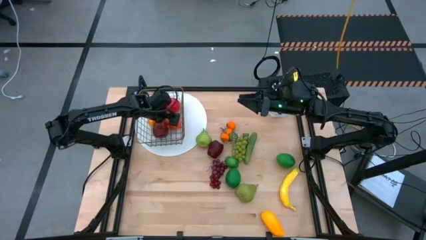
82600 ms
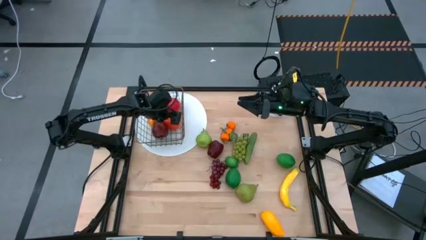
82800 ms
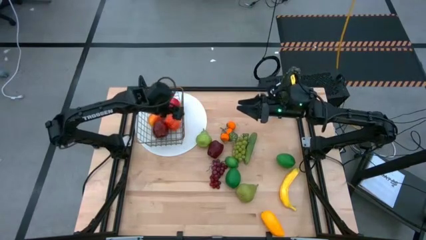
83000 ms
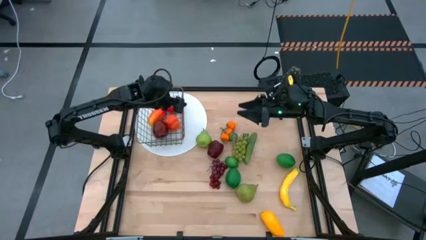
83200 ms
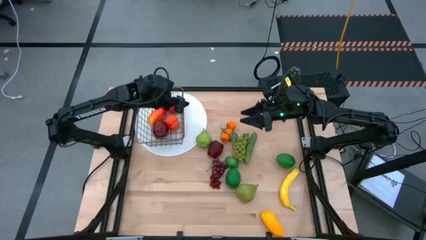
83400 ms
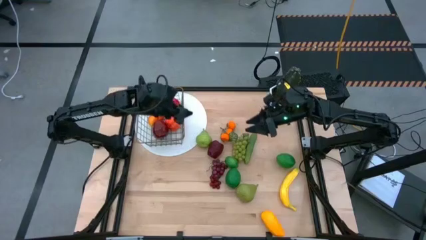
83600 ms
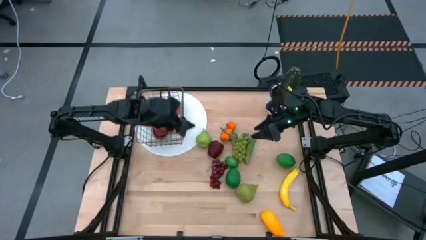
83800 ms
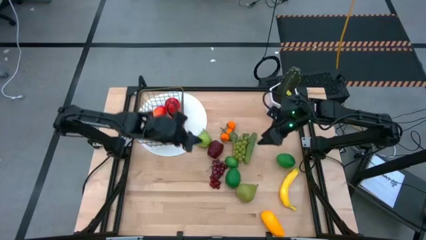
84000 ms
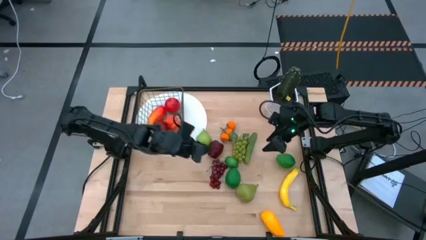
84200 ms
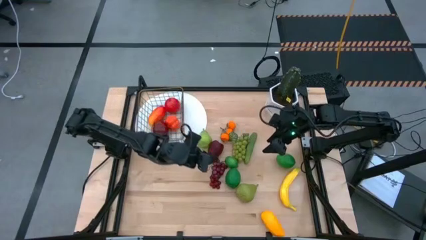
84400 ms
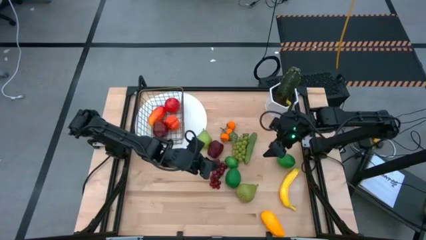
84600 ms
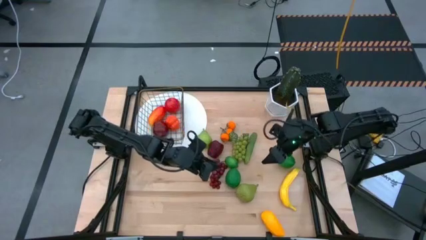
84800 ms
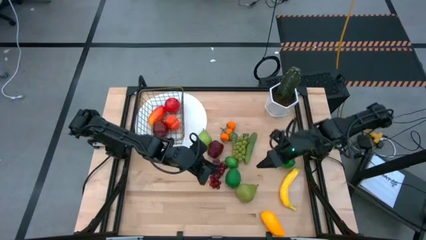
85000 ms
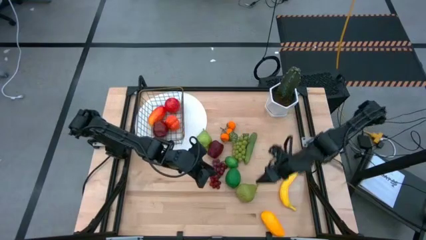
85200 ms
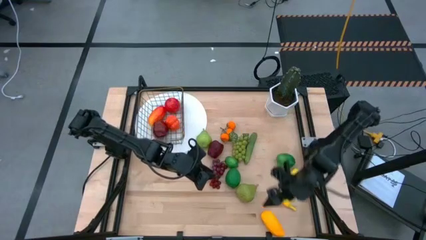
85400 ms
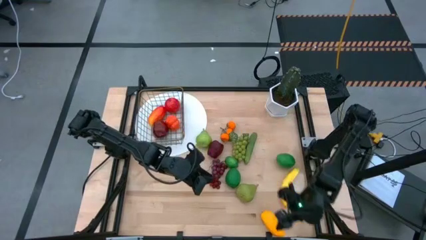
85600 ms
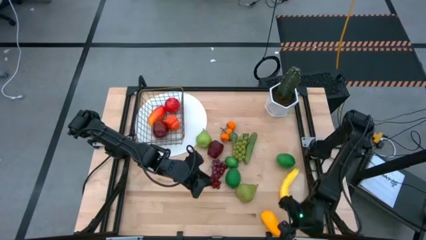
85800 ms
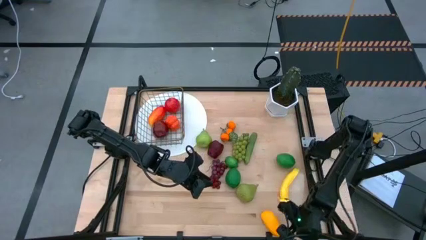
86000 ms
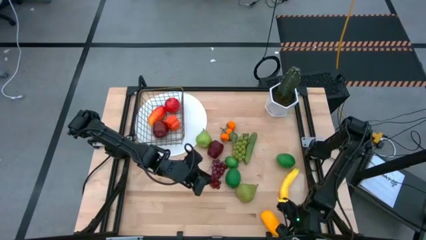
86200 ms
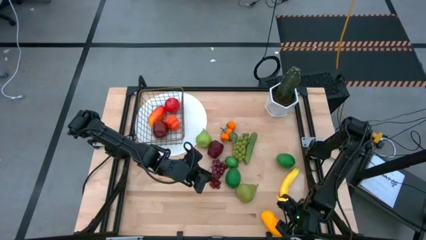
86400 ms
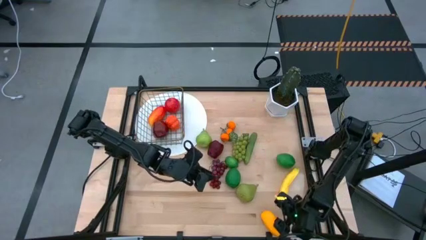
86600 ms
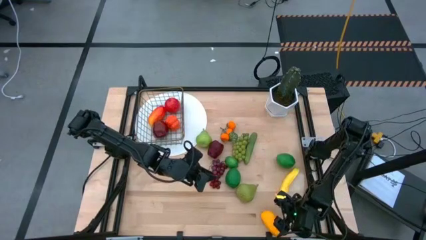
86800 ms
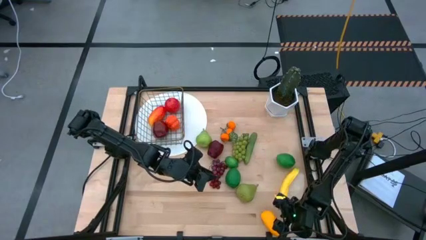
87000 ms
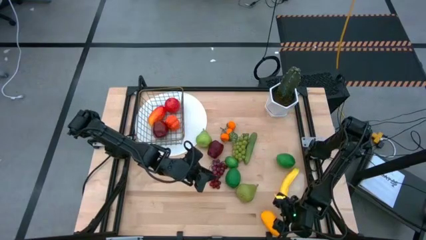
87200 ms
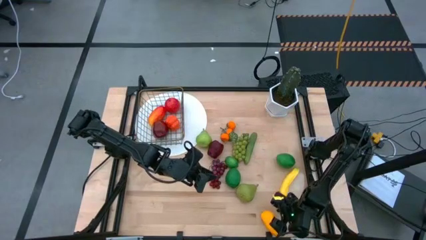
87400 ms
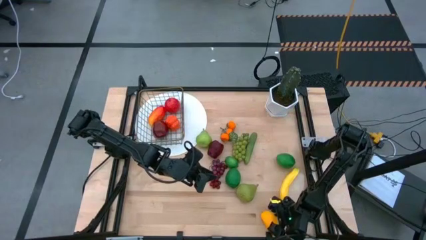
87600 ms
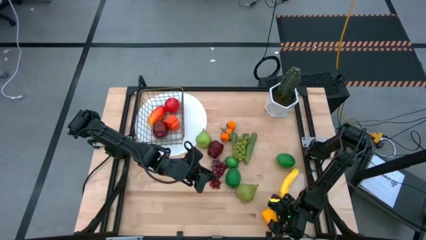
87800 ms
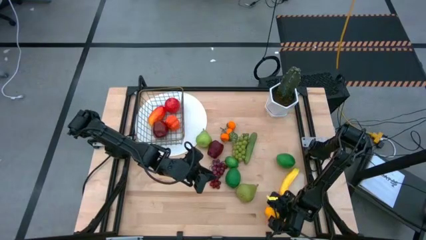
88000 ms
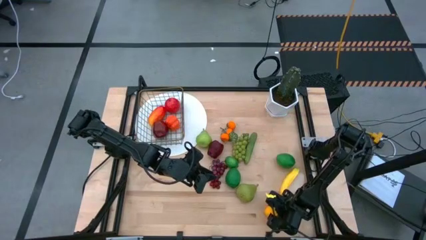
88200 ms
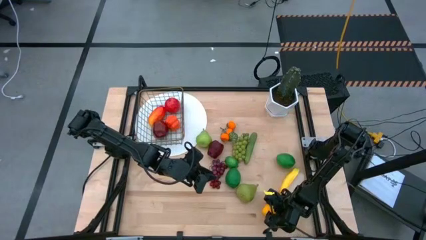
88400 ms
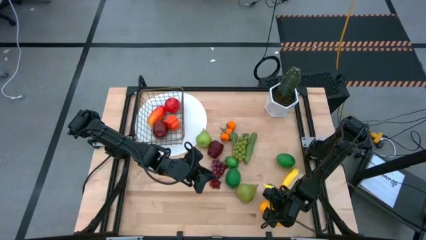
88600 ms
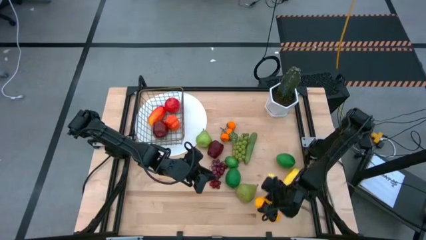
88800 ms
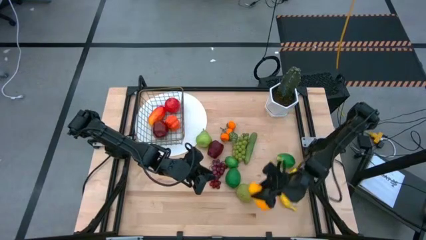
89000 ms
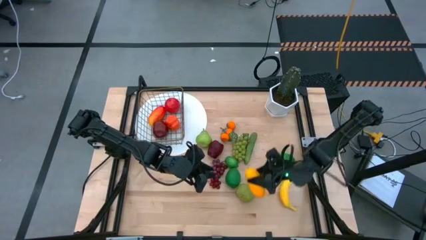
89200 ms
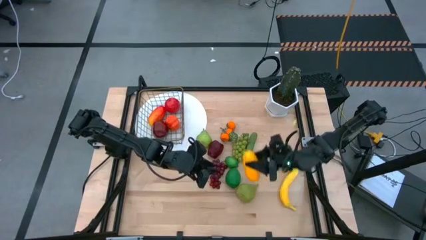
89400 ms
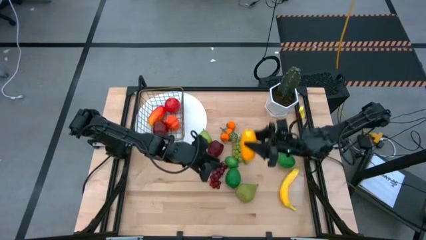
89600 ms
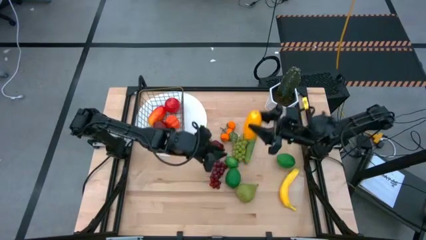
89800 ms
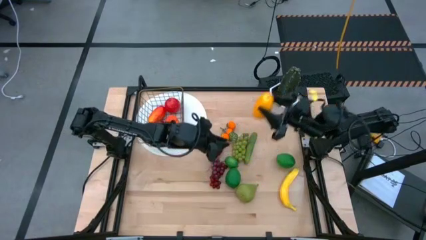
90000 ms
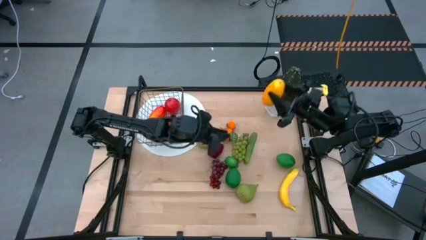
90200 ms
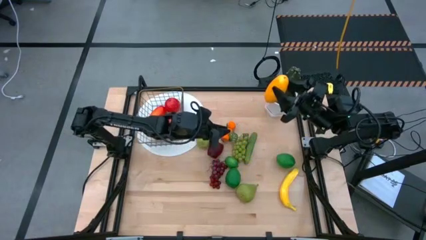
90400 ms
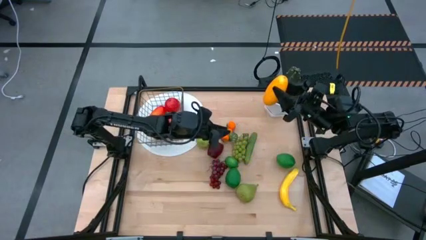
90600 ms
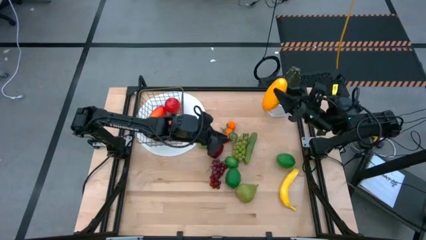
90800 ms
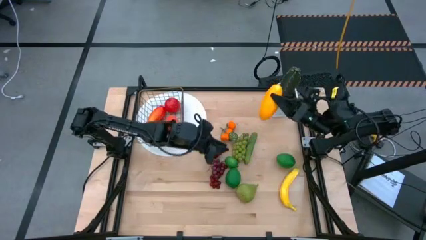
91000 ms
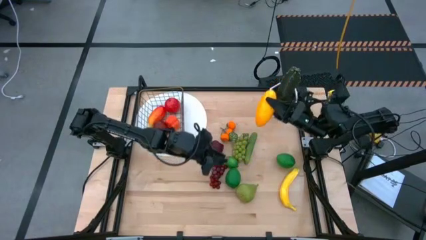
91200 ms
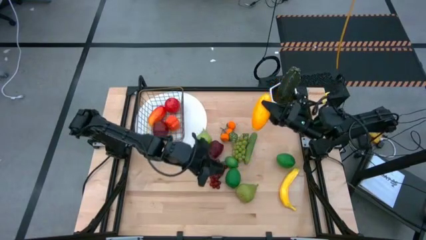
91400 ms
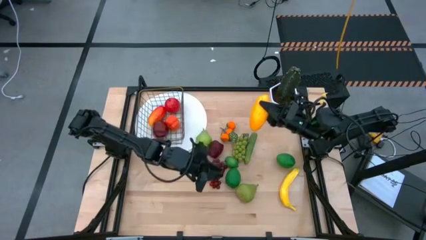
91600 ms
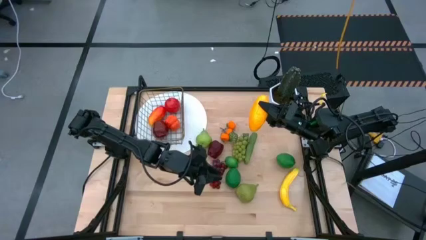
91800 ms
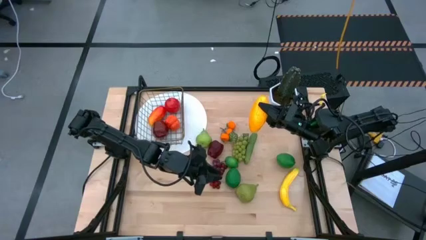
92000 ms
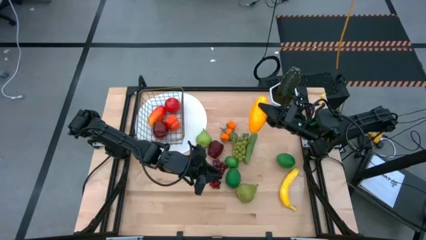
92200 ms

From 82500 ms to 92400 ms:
Task: Build produce basket
Put the yellow mango into the wire basket

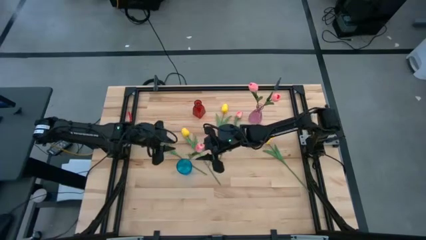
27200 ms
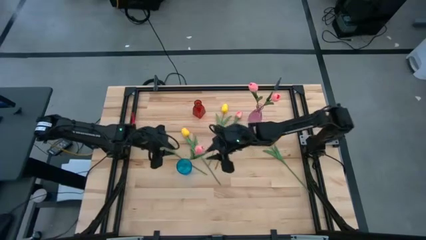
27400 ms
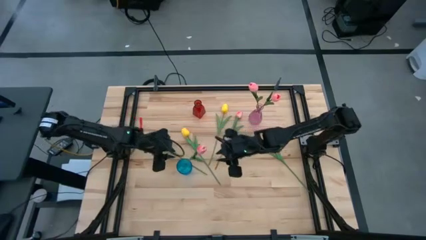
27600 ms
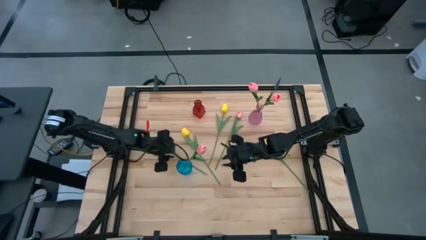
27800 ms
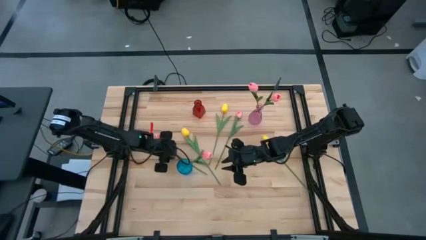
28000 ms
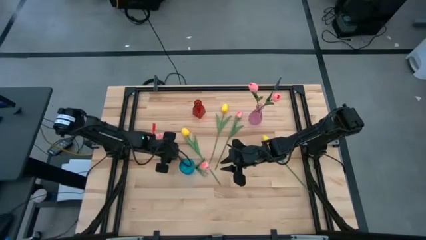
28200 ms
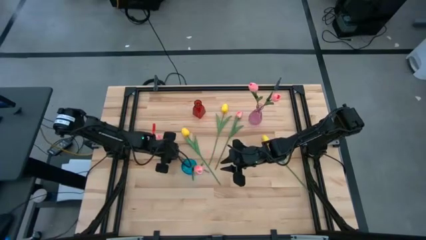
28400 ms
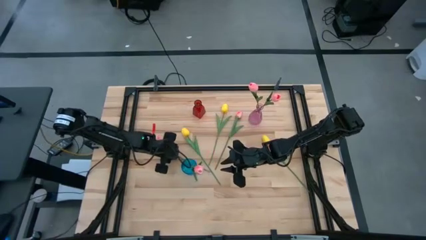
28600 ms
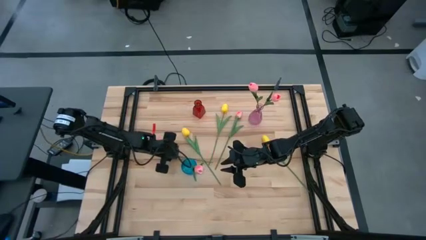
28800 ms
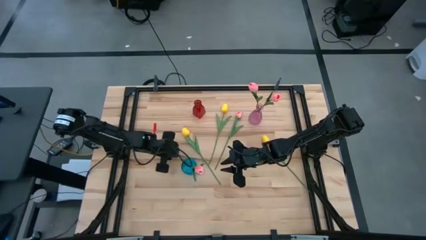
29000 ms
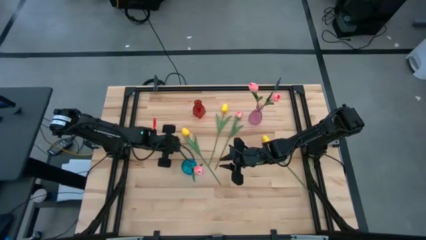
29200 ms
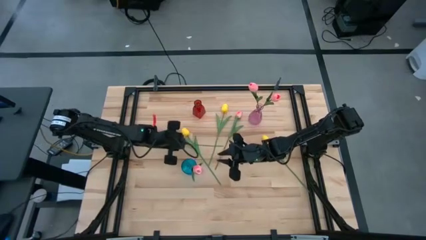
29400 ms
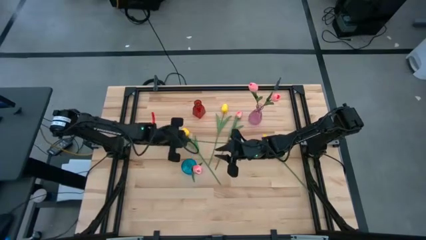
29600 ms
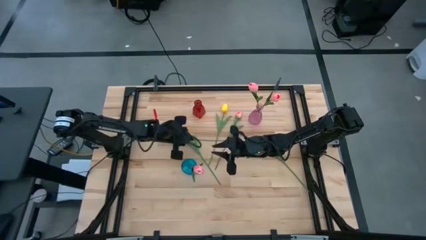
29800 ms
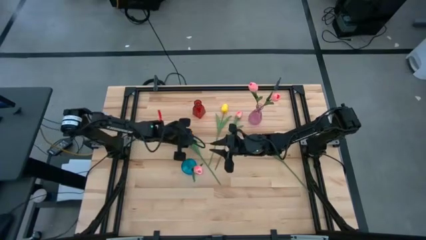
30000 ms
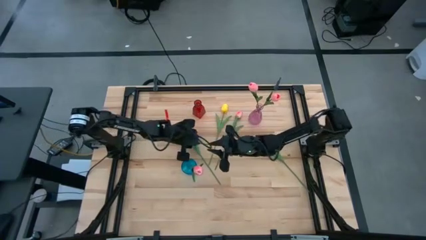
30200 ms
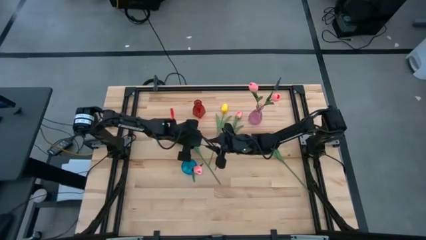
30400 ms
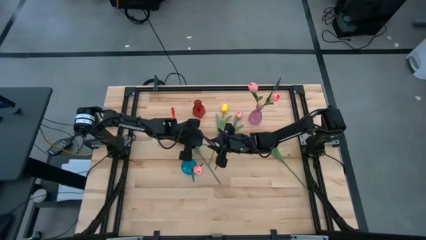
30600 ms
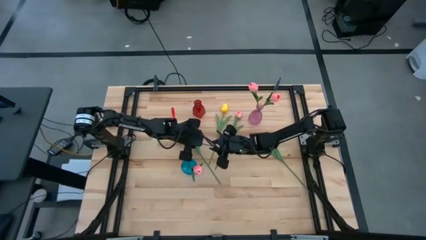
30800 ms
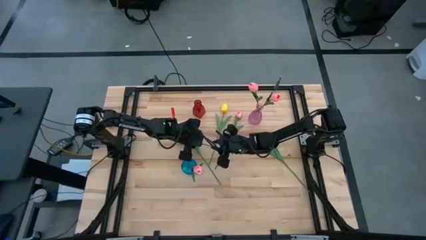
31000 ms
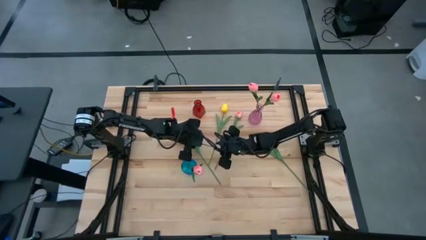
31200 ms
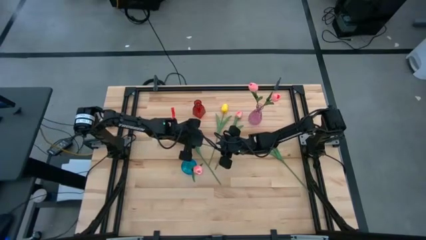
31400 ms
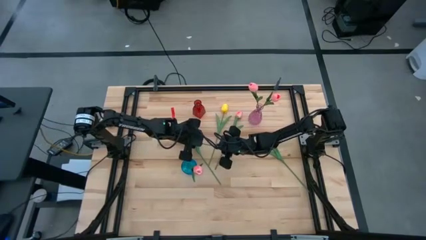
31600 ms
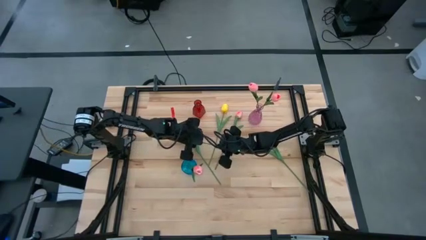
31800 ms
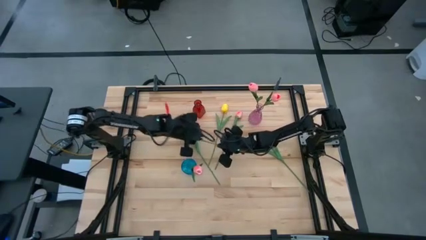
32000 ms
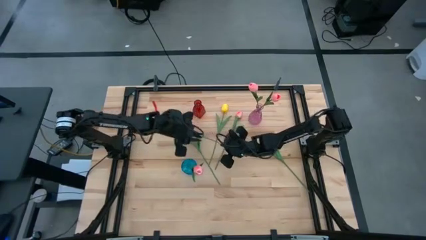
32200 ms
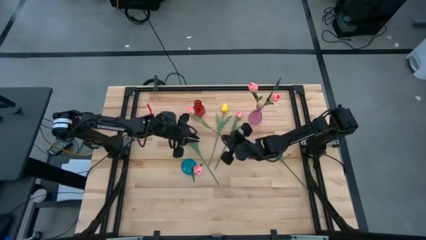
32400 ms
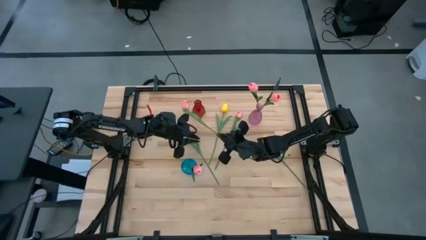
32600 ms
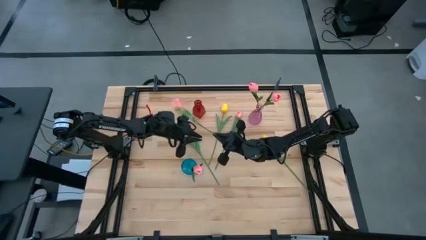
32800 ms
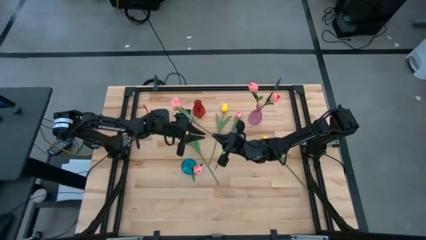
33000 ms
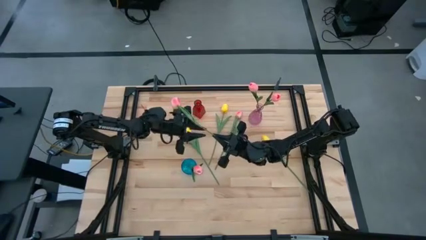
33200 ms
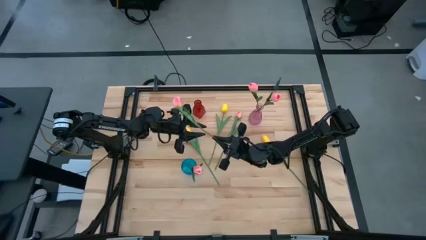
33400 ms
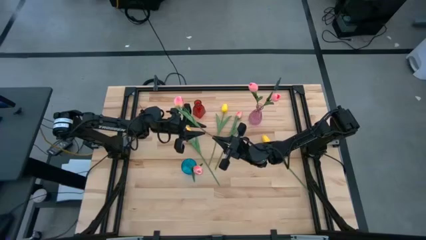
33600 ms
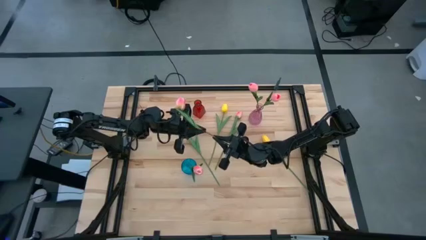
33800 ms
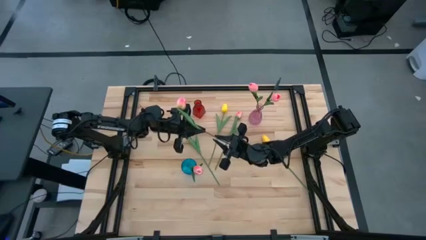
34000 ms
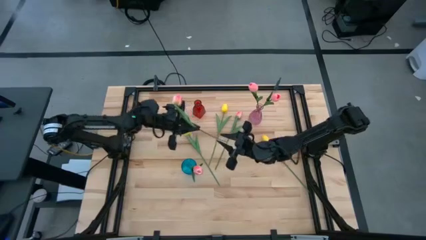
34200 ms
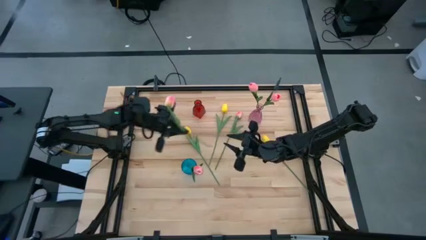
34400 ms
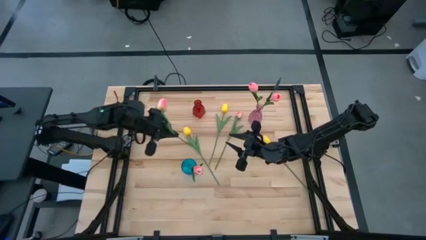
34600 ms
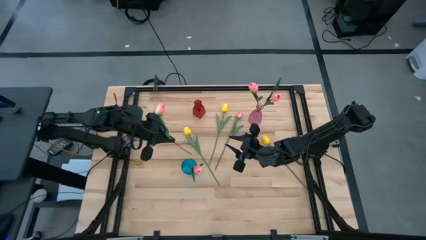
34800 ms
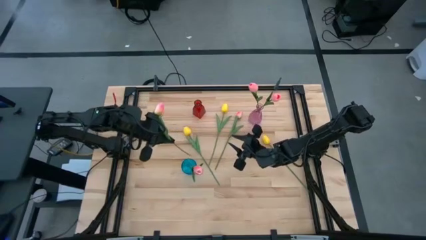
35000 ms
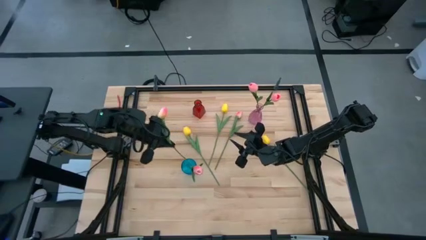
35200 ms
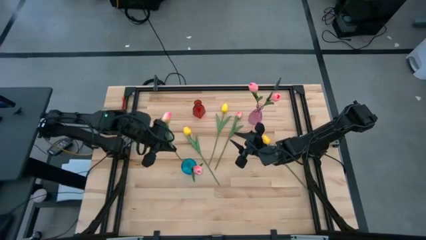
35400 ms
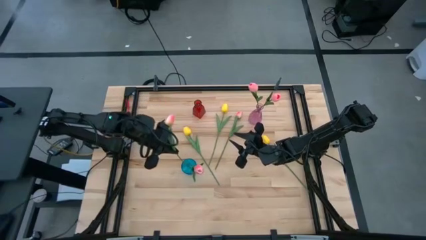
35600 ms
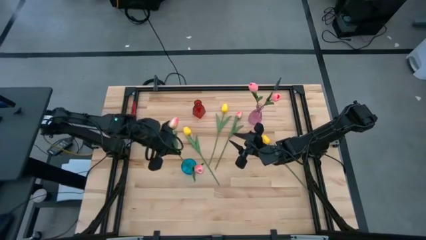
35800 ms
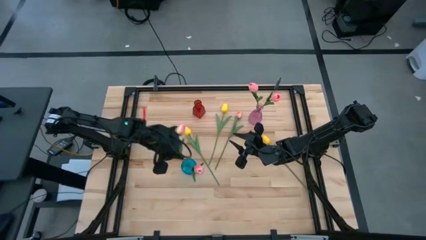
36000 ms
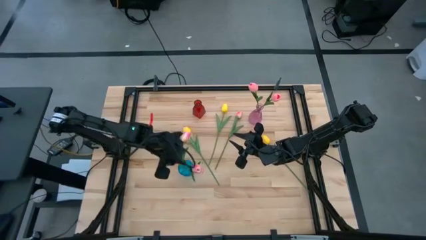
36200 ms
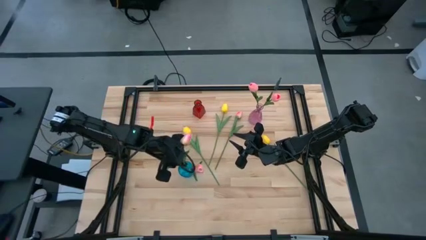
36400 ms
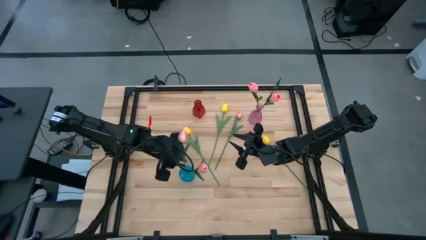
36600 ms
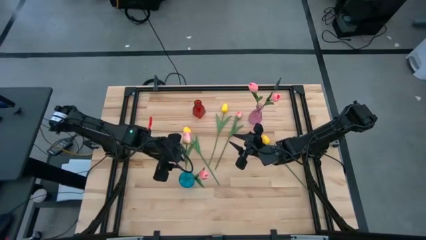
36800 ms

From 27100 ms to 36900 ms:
Task: Sort flowers into vase by color
Put the left light pink tulip into the blue flower vase
